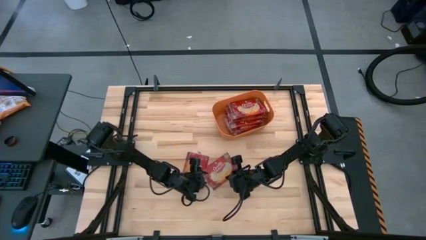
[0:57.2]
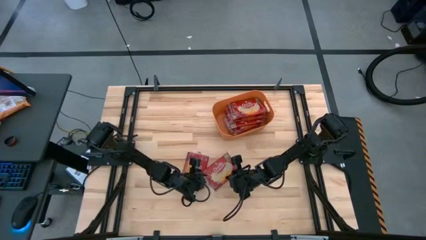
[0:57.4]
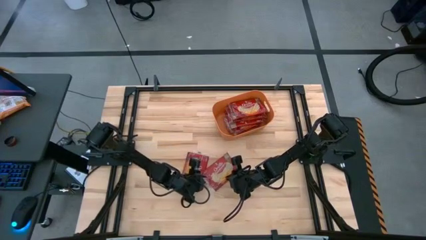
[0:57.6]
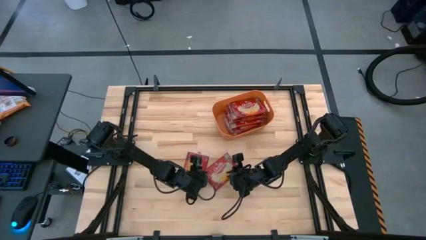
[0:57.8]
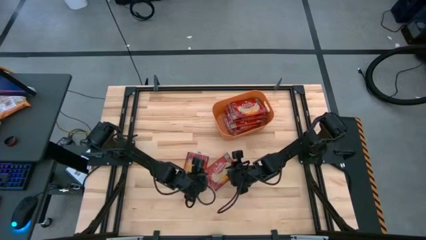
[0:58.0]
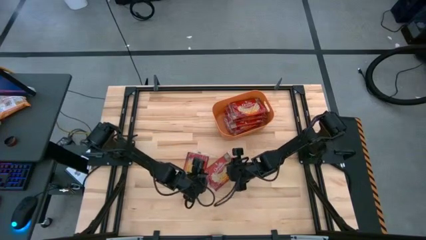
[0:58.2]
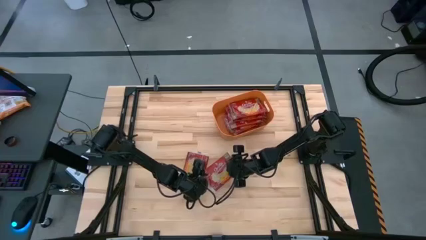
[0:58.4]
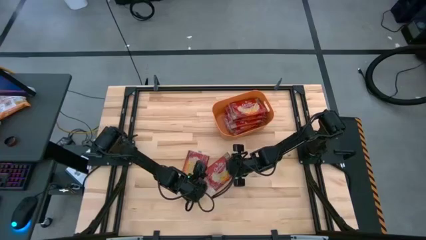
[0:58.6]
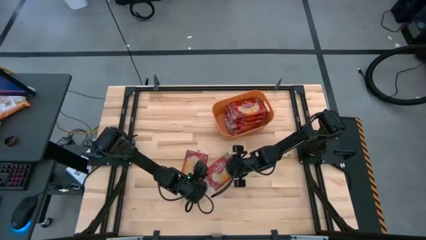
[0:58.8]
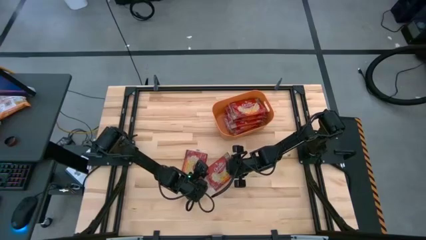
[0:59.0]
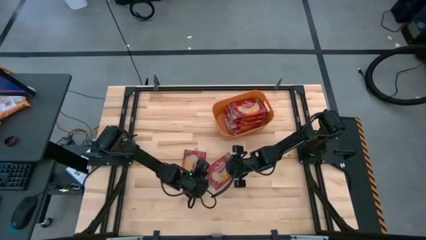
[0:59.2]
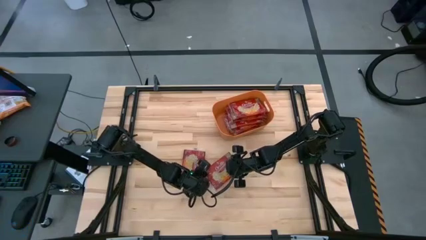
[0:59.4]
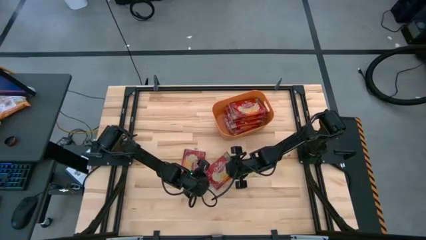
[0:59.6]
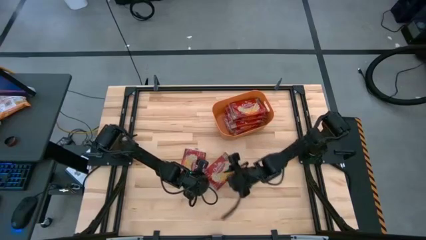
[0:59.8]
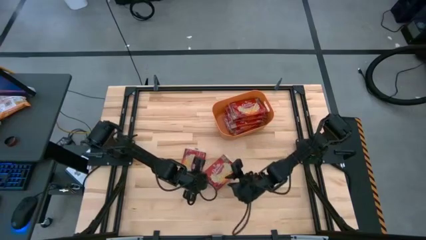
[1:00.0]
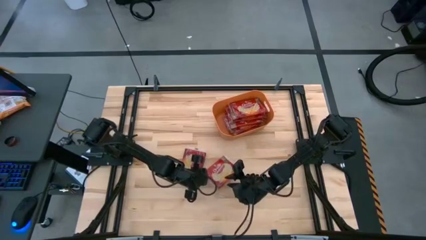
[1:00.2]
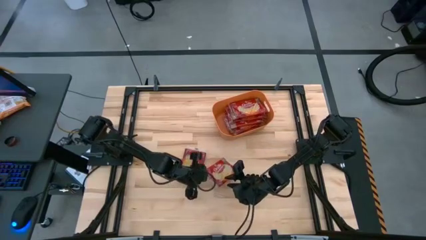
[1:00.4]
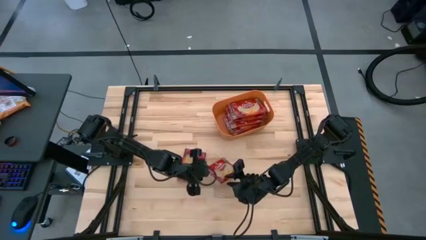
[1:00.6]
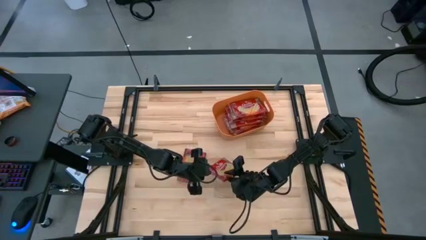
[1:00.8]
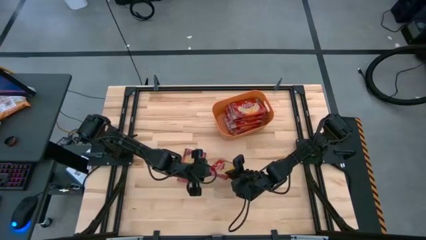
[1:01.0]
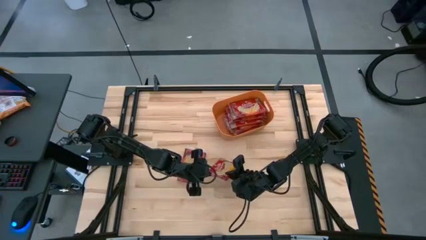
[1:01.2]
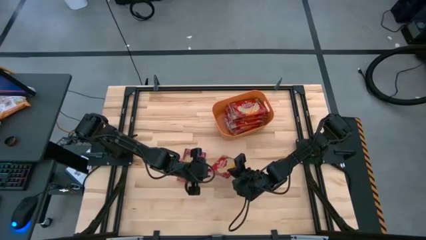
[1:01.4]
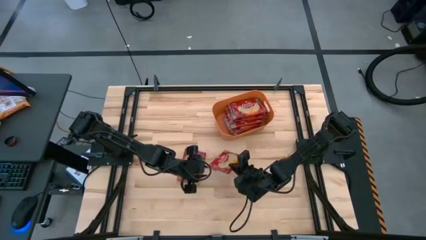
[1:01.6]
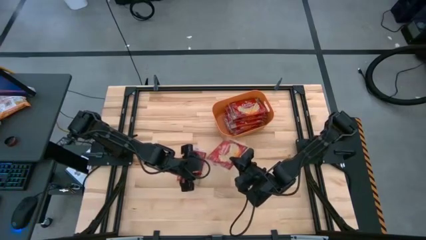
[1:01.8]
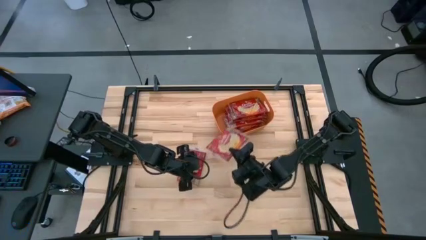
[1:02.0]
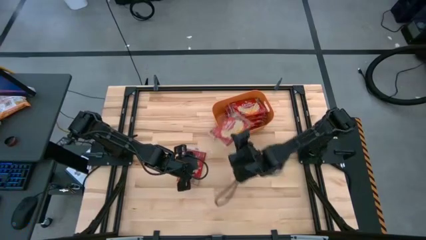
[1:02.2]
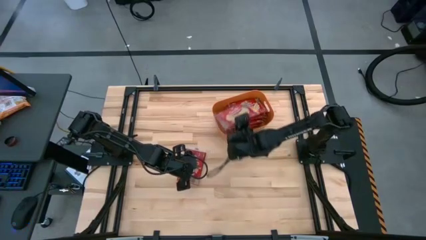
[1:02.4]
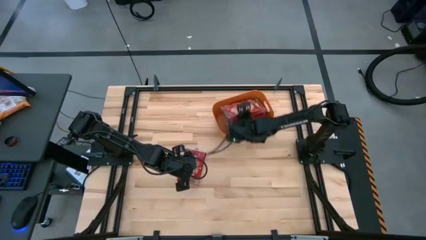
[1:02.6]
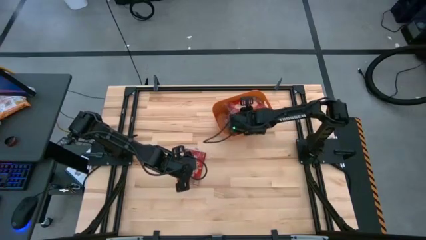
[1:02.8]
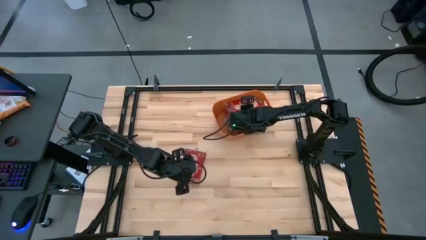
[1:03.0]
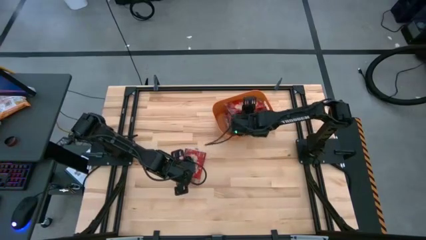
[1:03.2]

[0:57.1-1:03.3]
Task: Sort popcorn bags into baskets
Put the popcorn pack into the orange bin

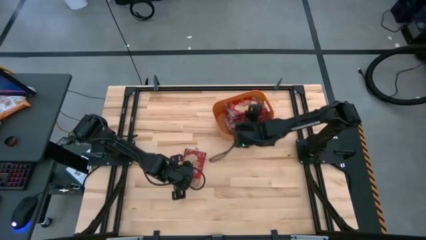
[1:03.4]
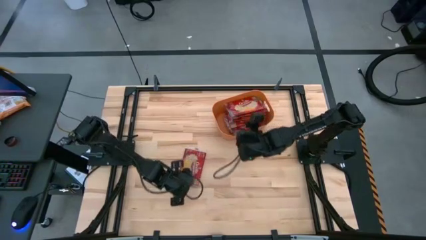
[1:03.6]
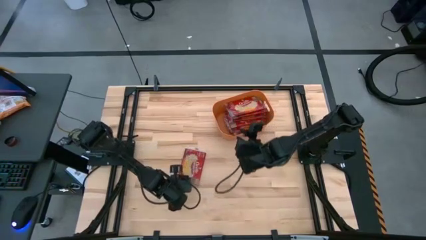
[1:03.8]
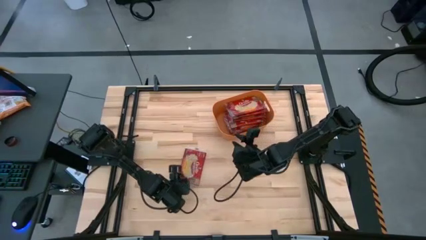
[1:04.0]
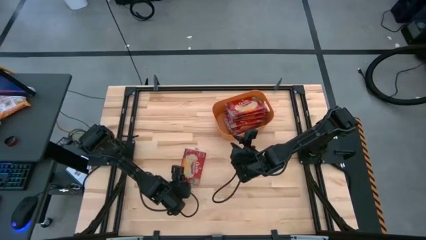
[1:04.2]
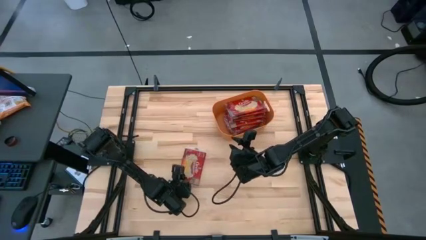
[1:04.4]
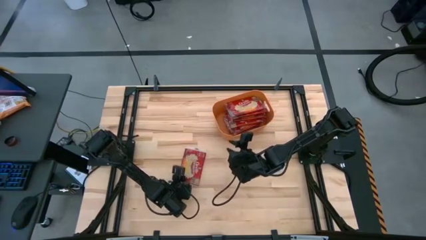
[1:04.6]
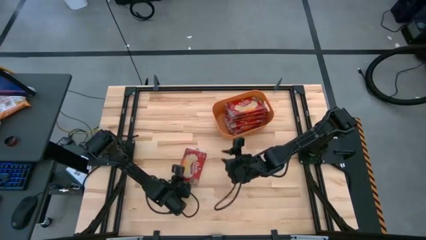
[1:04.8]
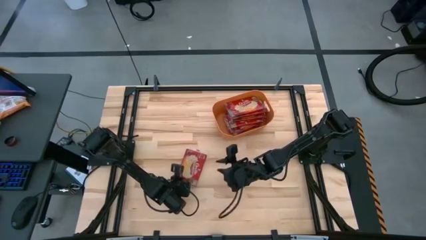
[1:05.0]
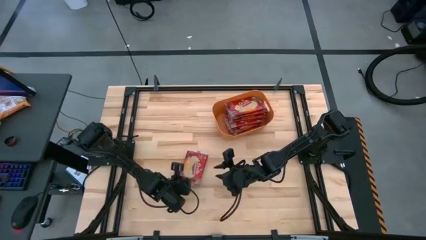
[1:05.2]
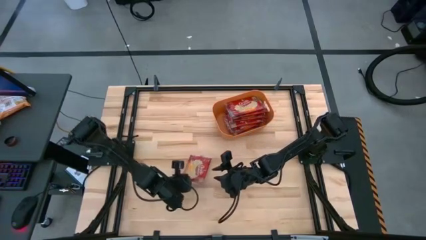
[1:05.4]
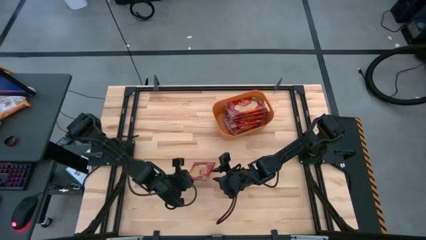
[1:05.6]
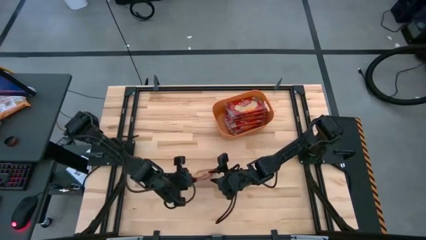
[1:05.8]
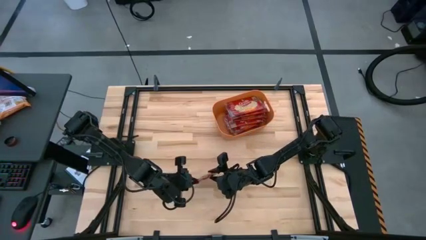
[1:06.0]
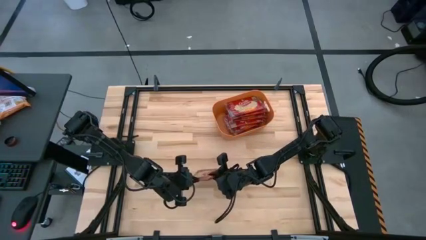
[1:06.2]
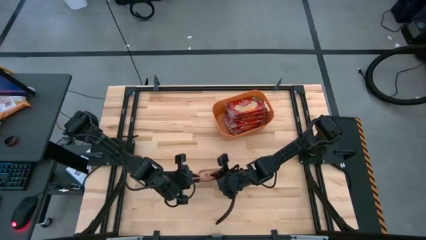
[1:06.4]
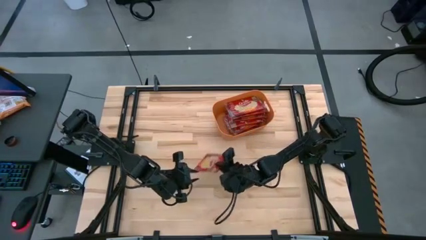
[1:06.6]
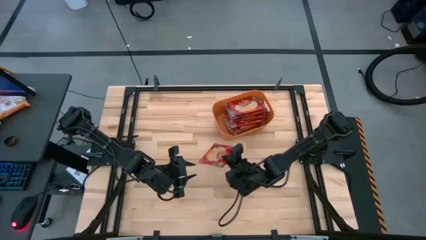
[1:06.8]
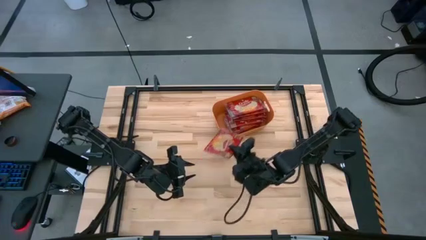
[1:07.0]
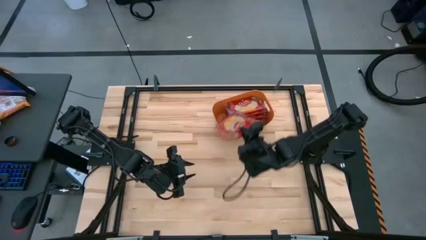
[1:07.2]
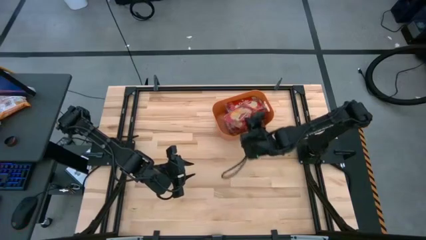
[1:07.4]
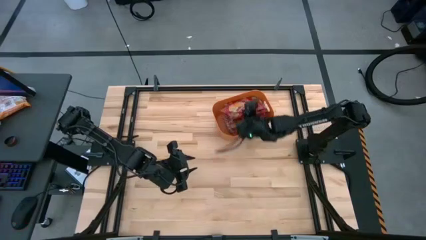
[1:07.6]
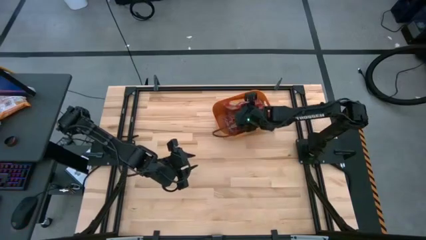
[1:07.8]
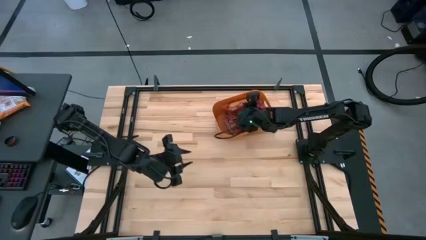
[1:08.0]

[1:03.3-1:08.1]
Put the popcorn pack into the orange bin

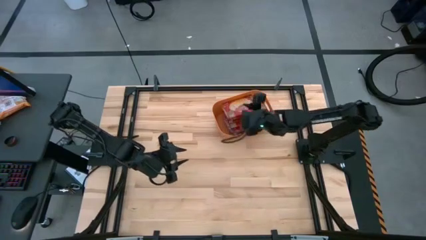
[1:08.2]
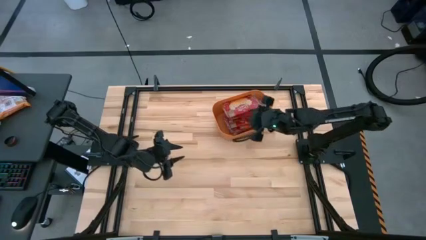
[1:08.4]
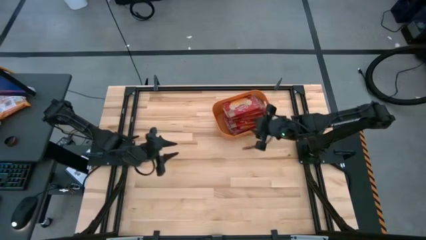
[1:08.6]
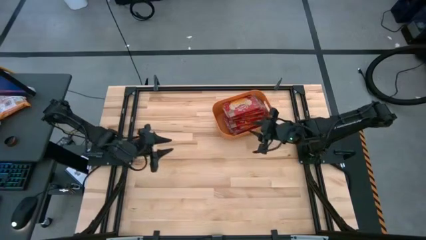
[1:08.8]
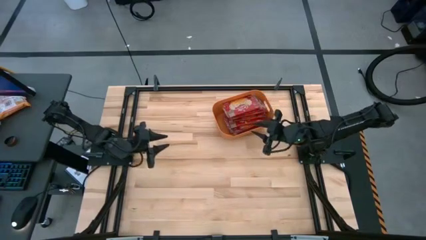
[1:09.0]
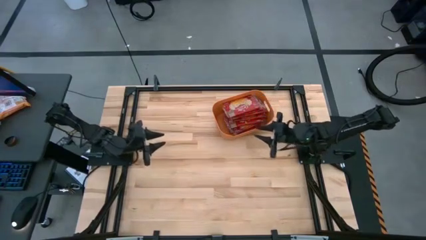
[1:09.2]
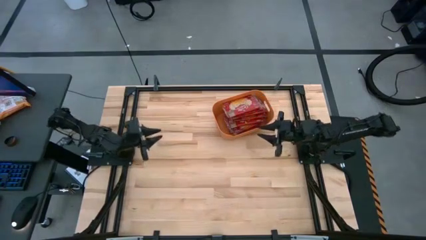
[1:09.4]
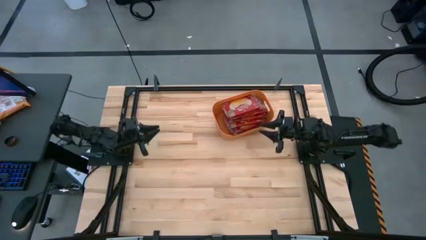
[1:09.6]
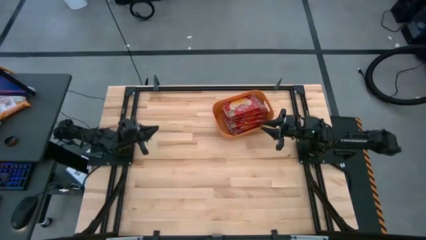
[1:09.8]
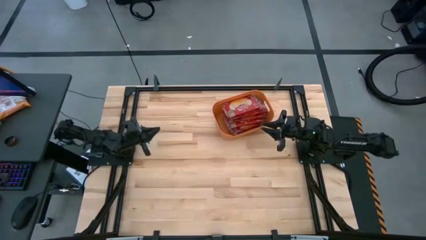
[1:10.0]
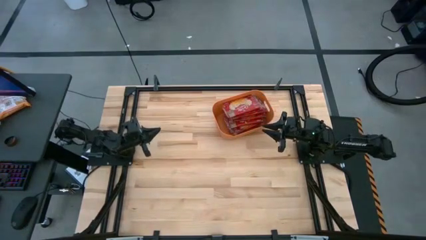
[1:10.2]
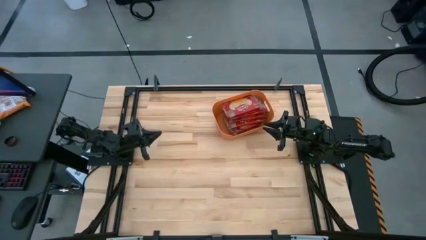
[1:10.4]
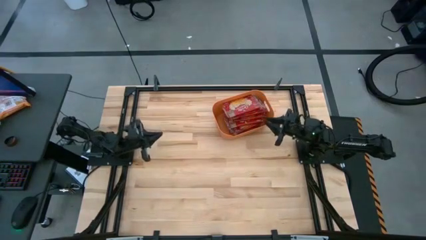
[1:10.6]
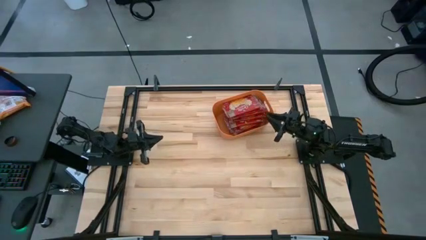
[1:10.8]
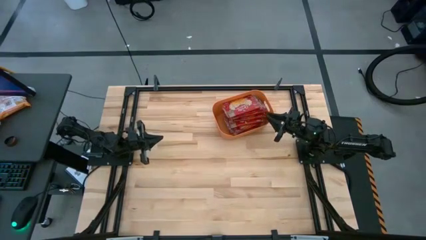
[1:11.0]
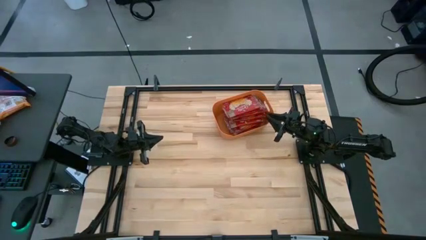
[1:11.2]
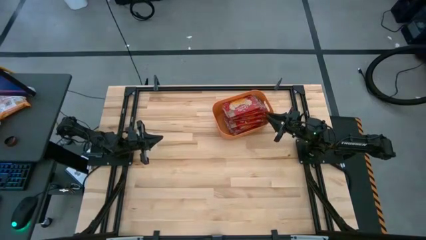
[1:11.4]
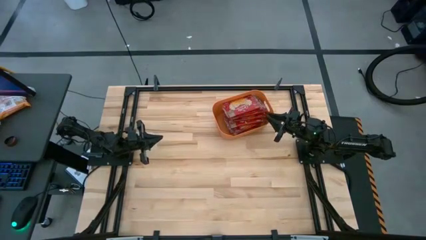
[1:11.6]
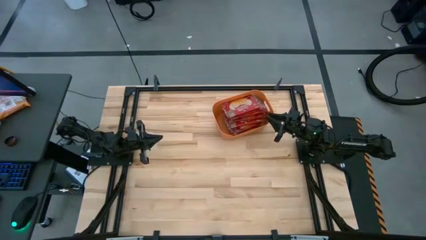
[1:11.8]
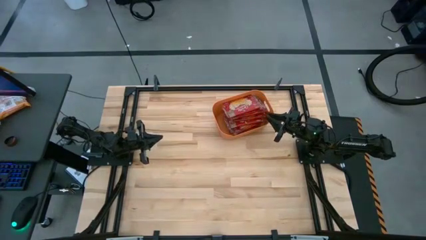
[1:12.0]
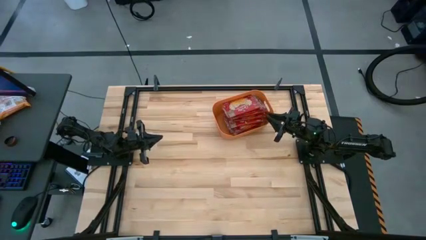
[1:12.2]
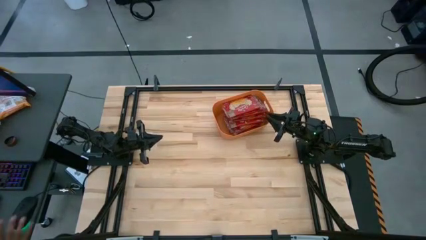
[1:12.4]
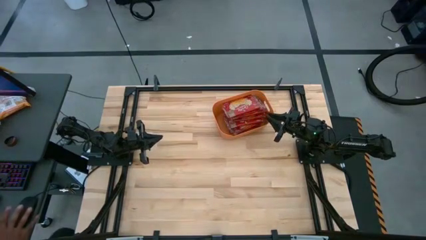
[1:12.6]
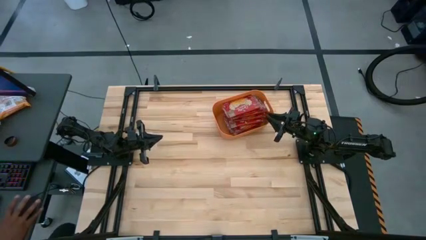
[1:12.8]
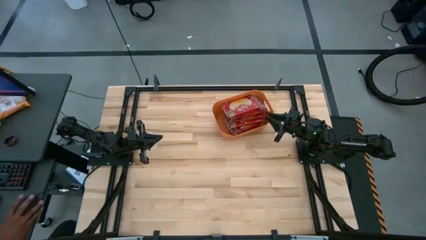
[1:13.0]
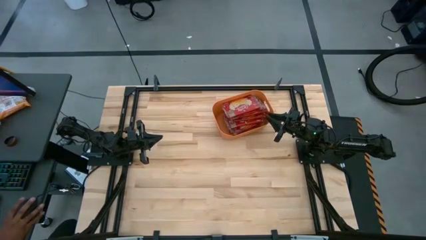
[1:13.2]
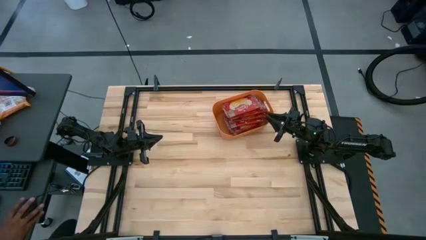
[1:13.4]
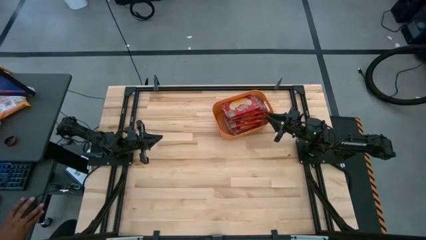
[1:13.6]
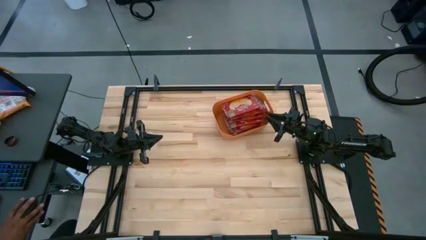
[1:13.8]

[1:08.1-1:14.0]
Return to Home Position
